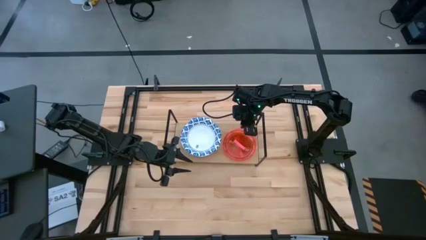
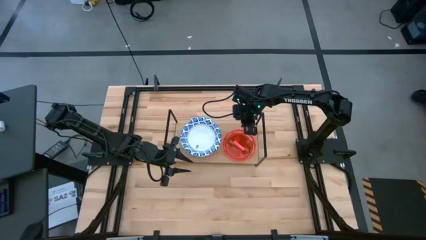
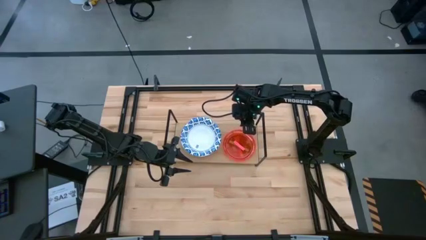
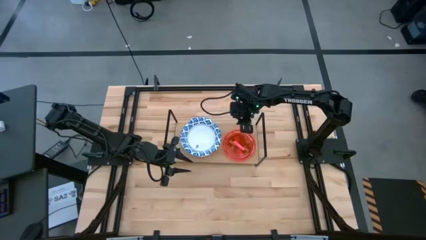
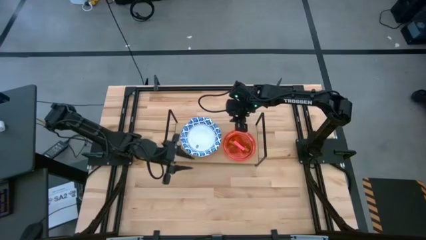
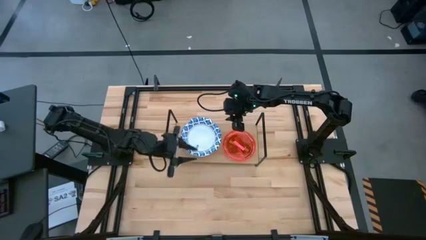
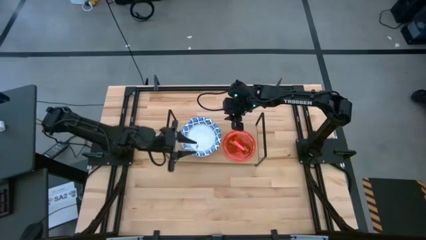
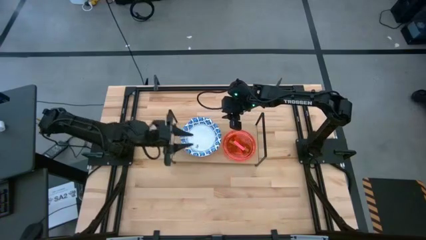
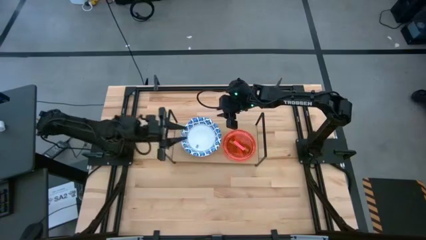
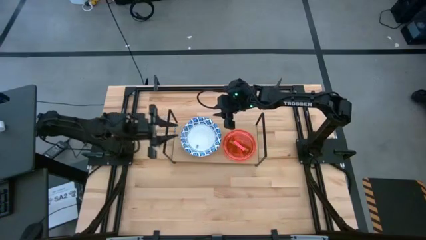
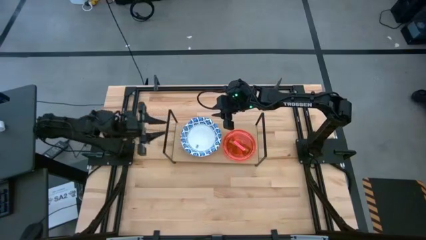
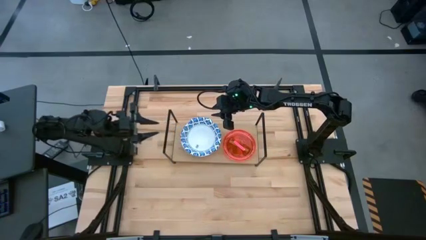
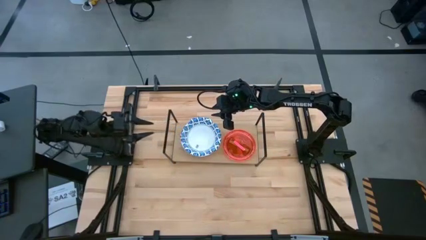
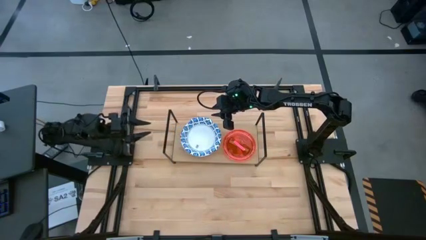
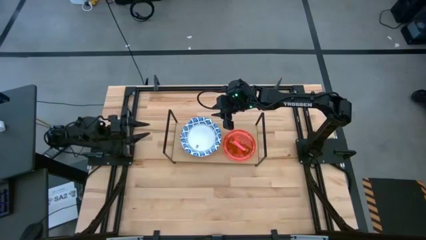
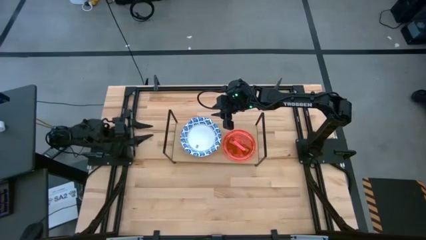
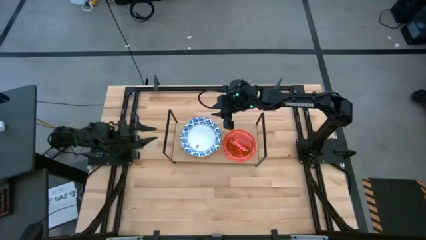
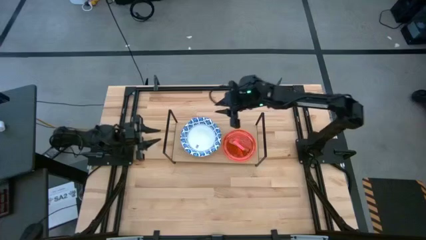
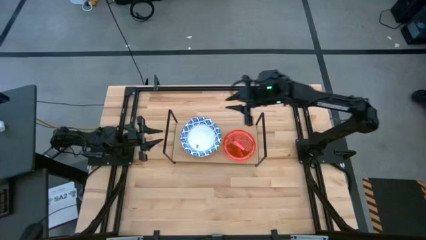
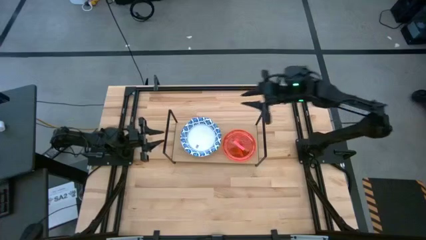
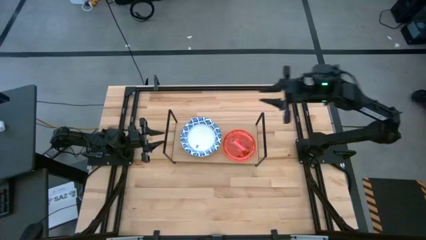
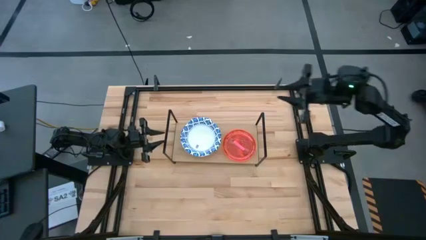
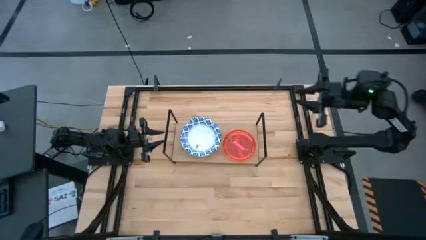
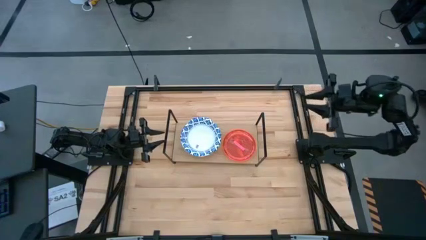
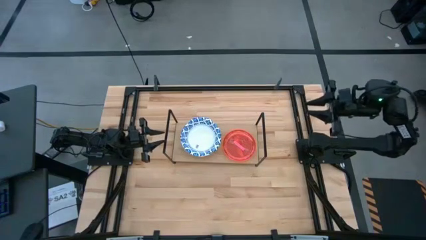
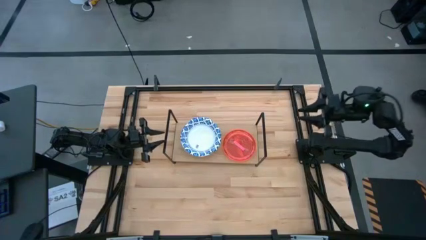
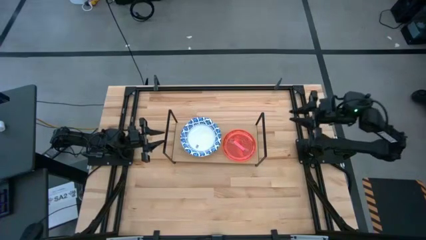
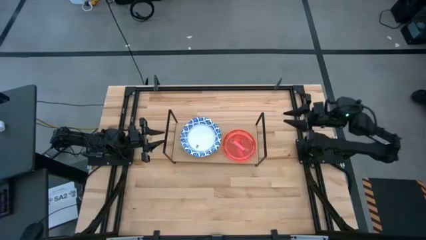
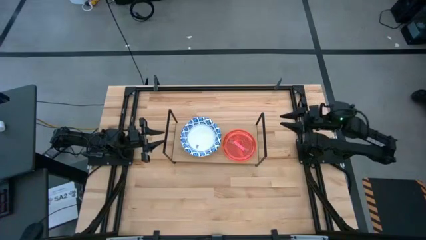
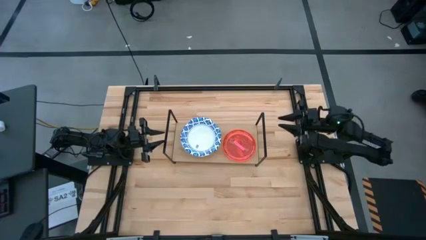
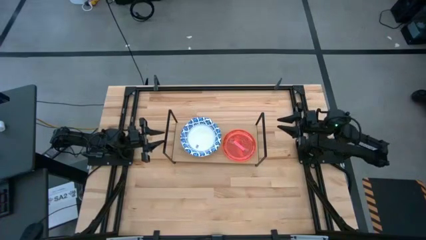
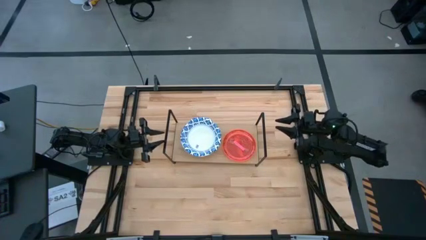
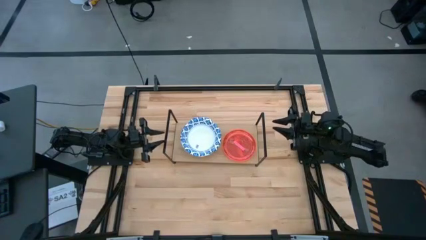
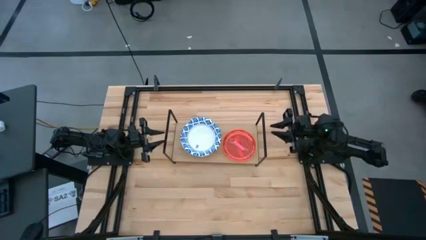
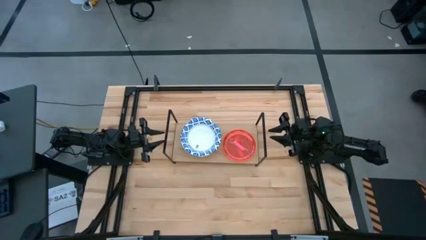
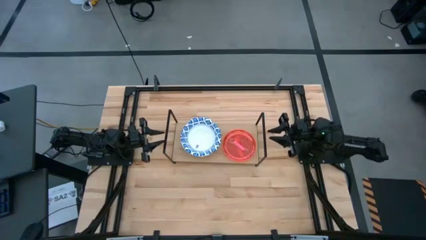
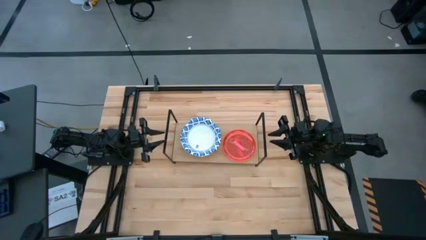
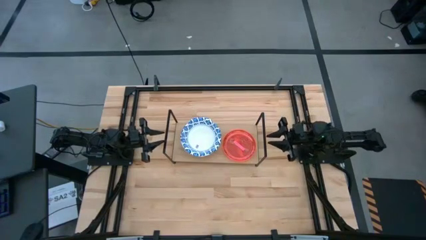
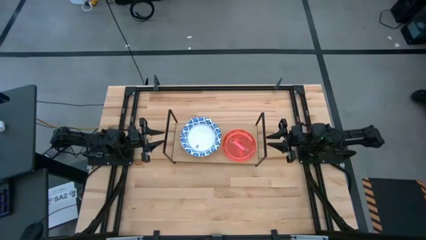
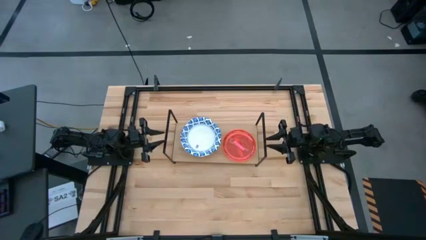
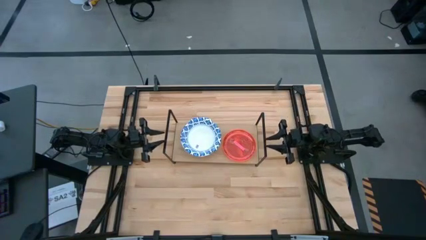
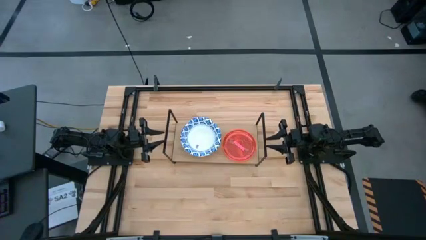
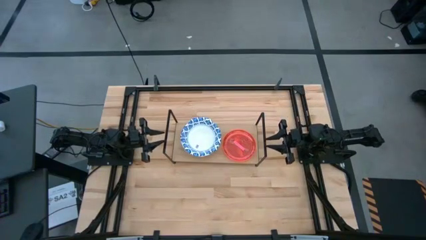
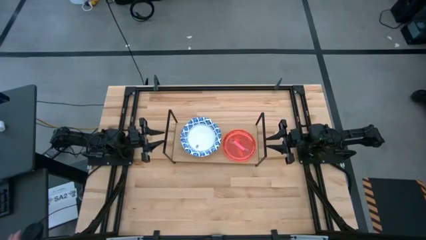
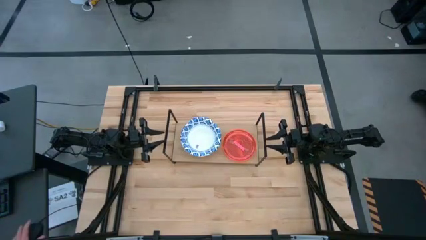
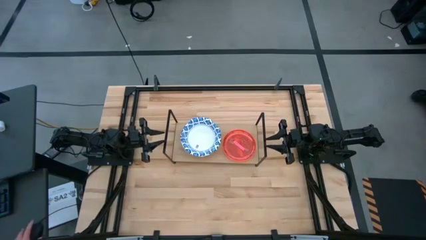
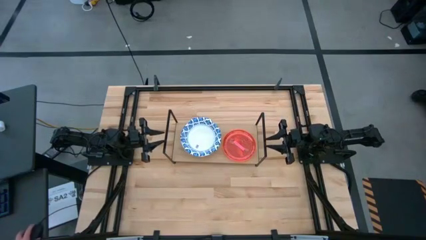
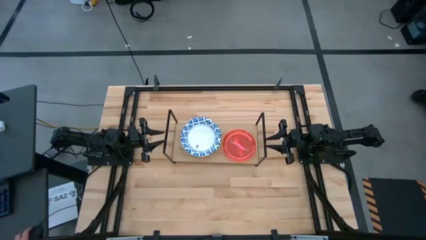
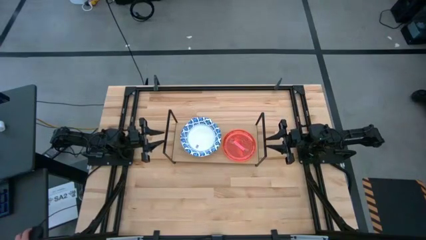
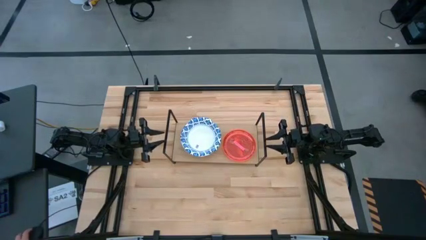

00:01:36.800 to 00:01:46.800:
Task: Place and stack plates onto a shelf
Return to Home Position

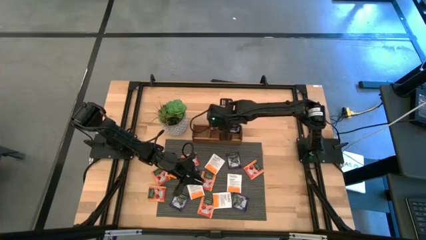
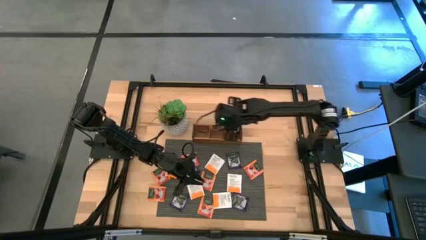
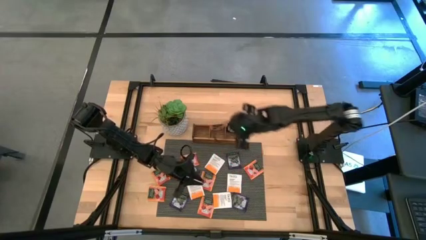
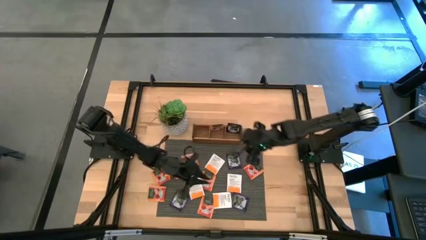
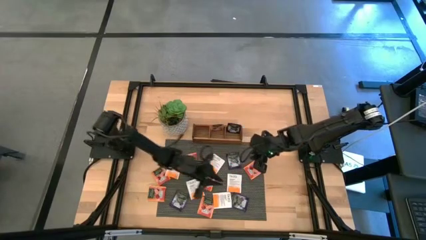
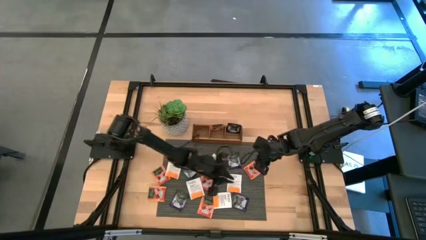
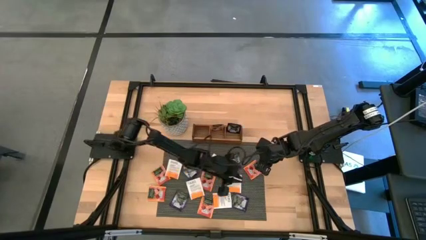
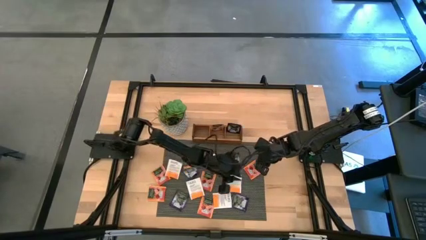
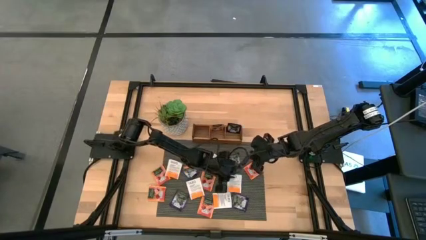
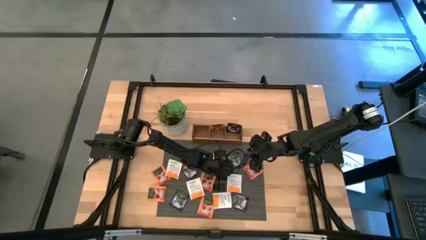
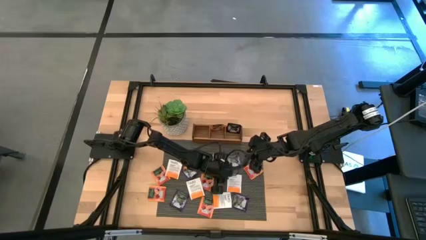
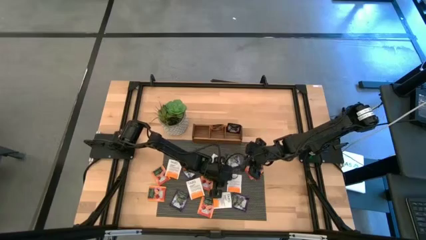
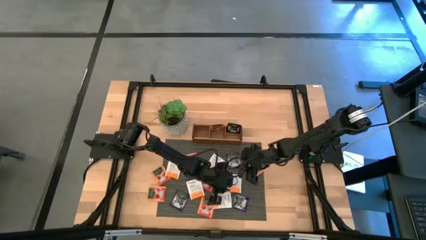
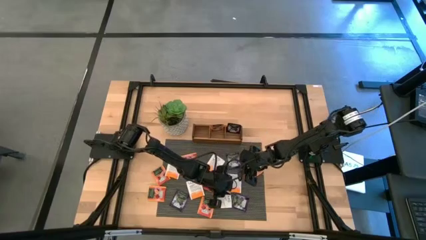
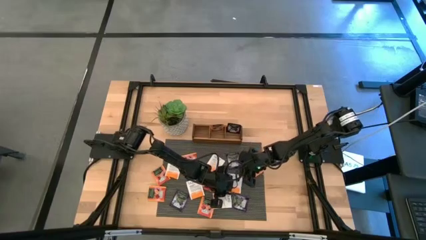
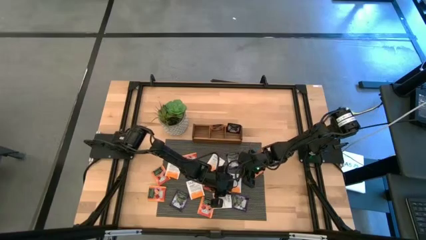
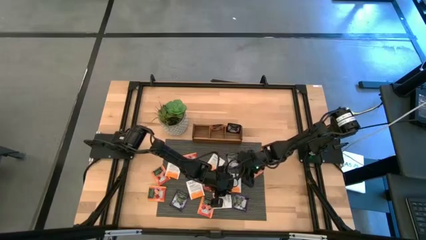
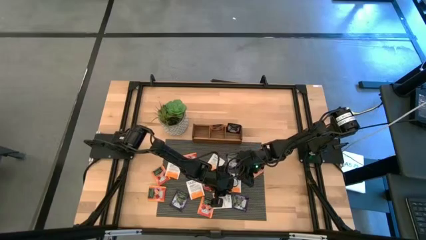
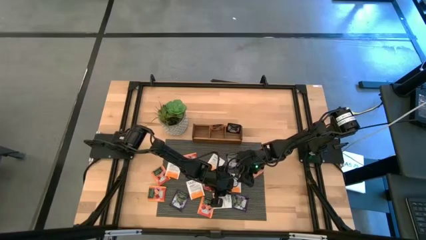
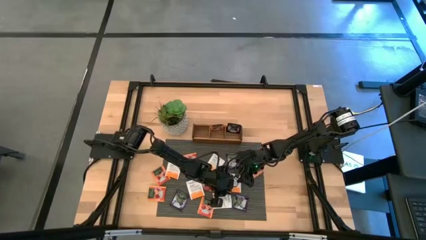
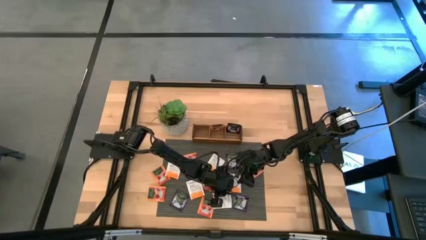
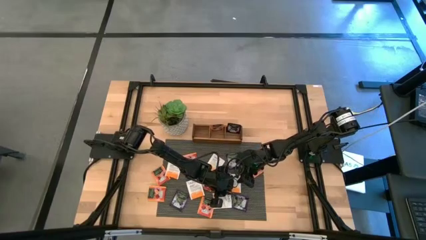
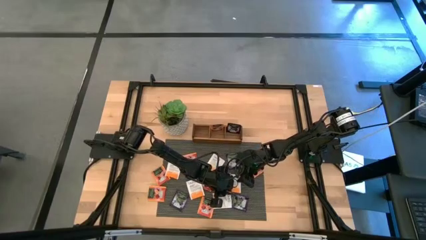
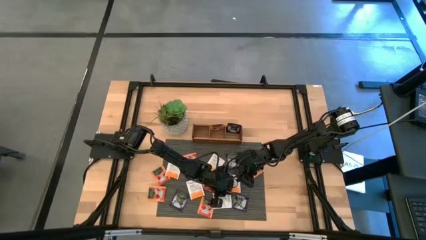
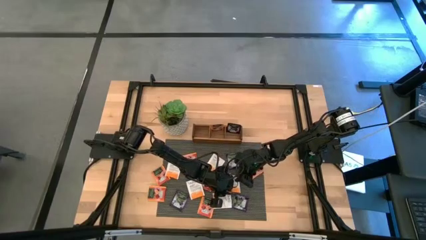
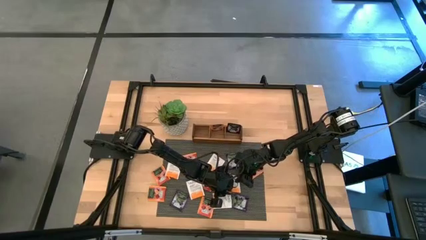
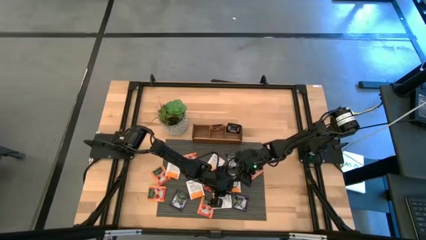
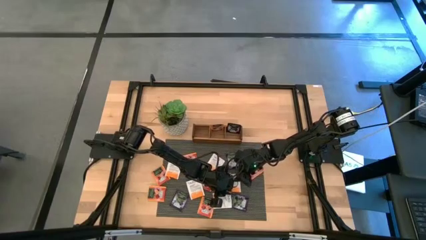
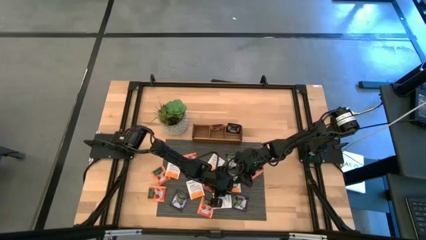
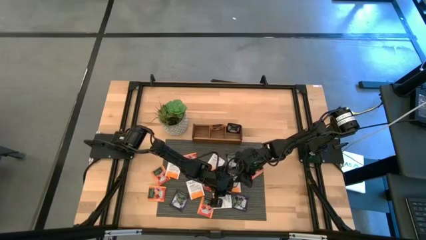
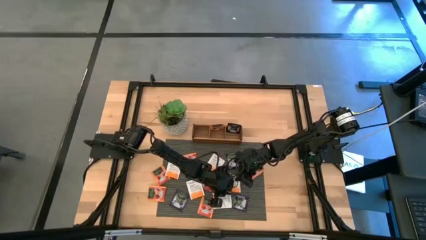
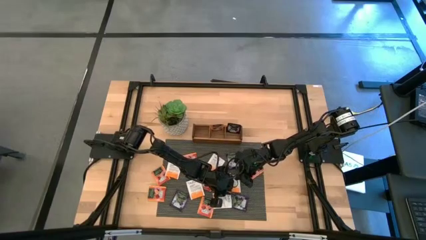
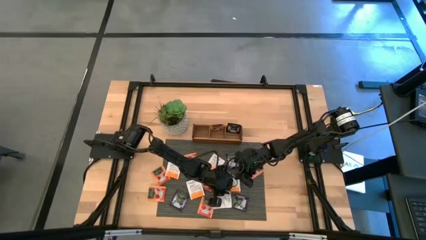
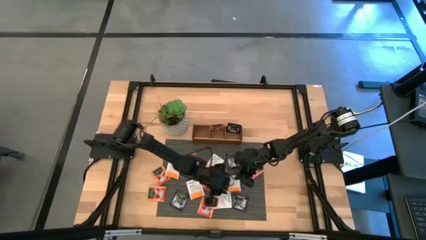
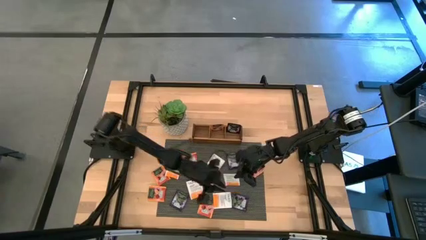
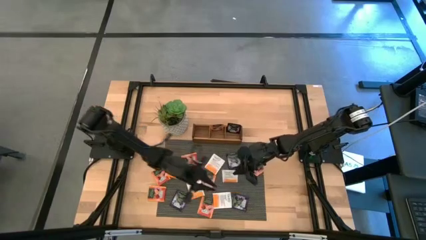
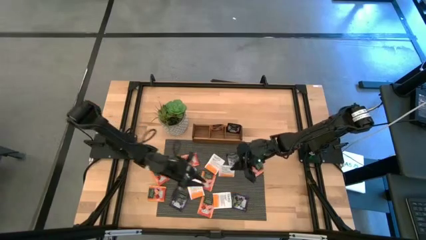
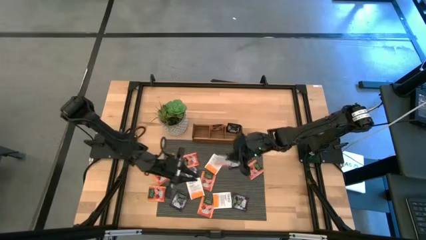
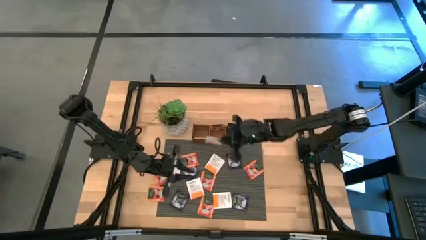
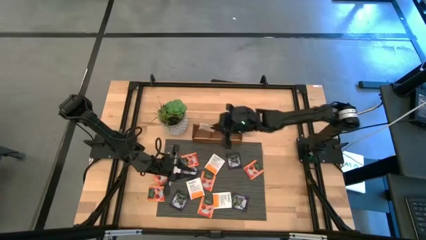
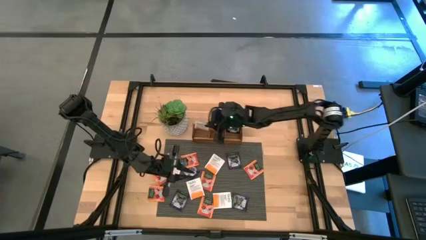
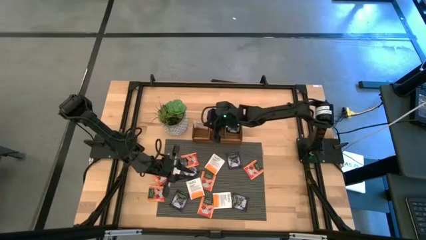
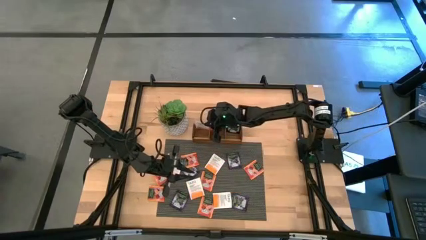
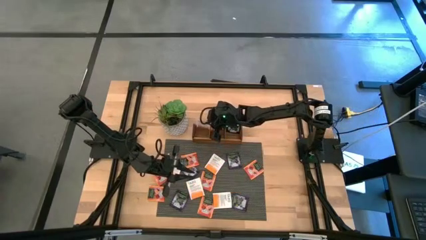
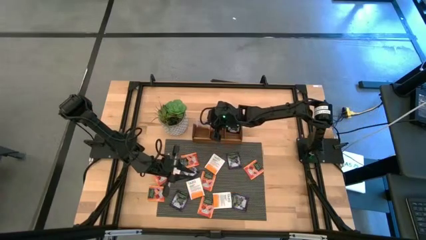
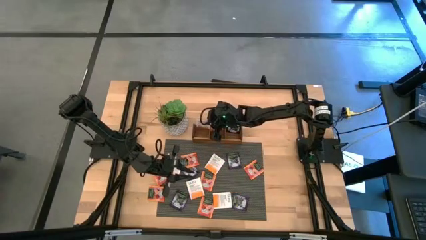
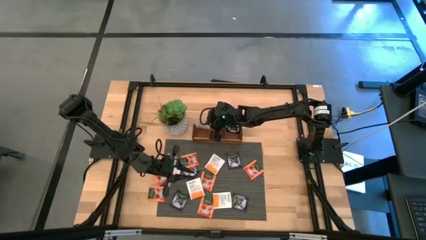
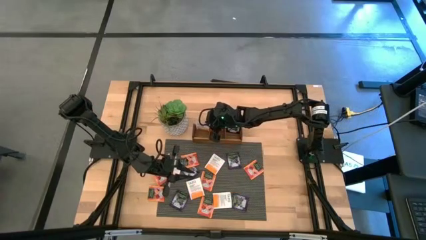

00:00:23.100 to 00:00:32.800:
Task: Pick & Place Tea
Put the white tea bag into the left section of the wooden organizer
